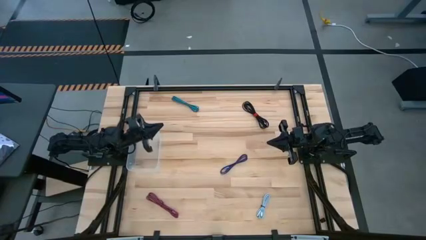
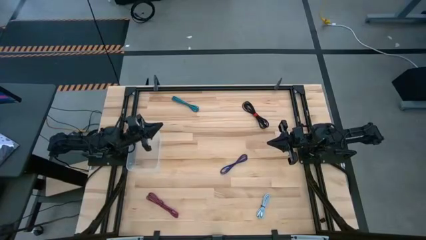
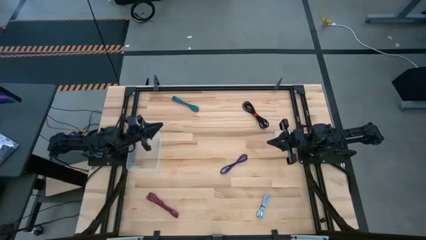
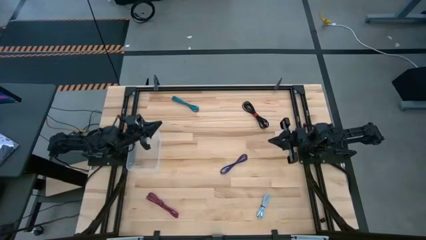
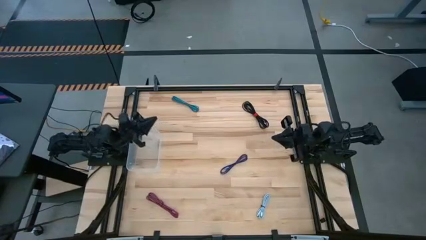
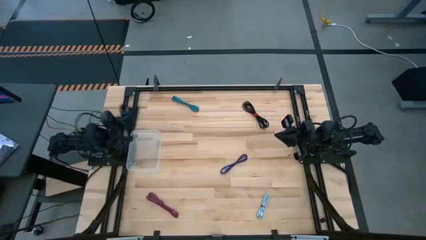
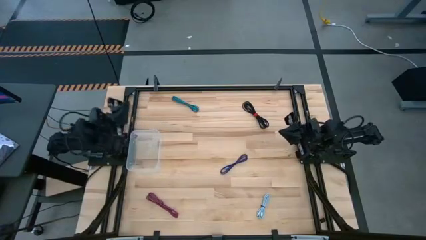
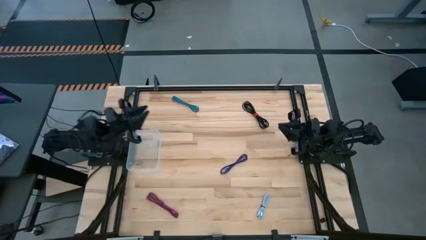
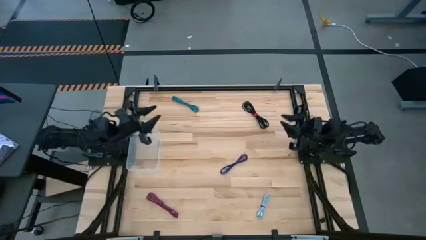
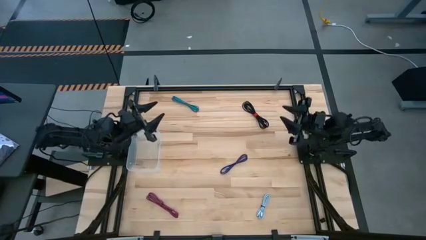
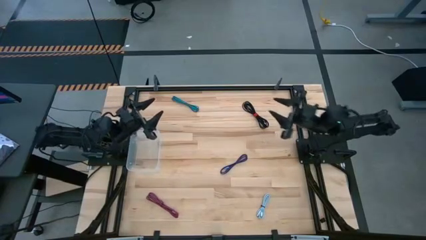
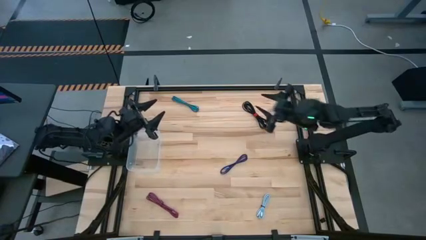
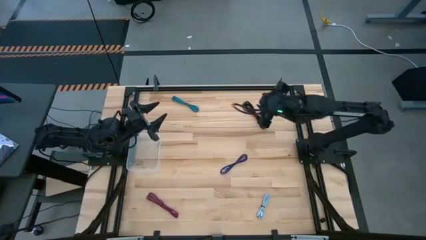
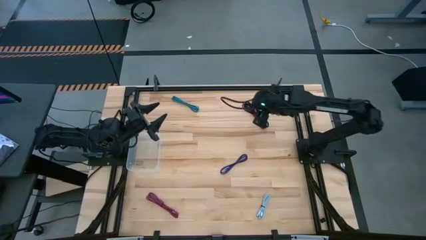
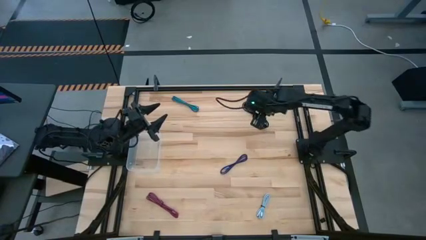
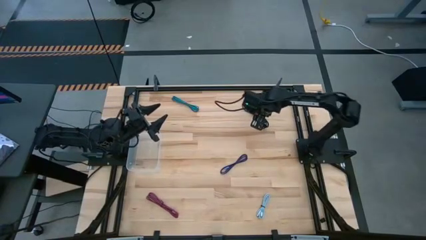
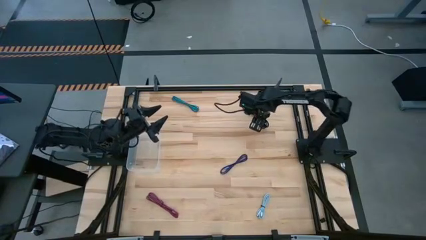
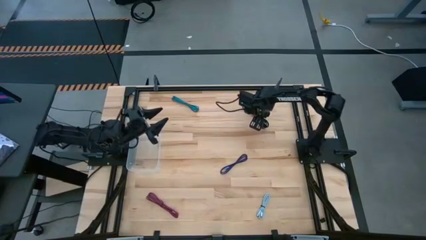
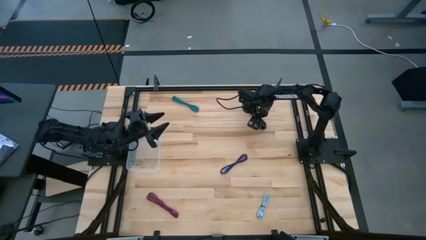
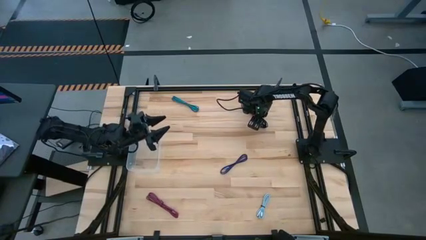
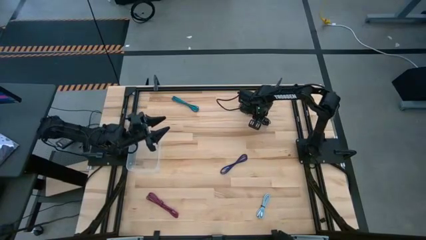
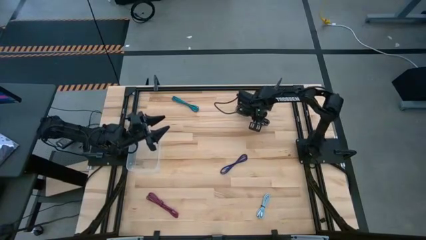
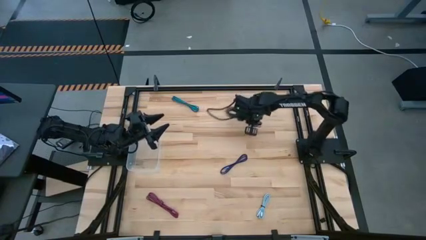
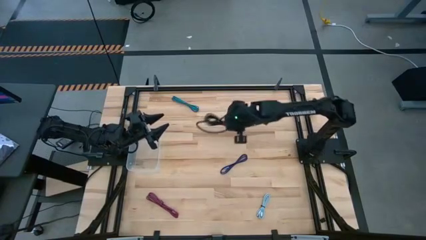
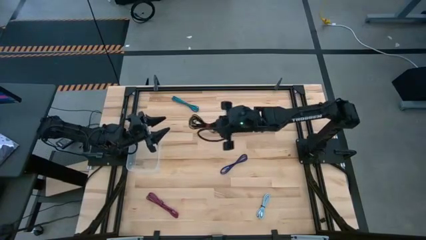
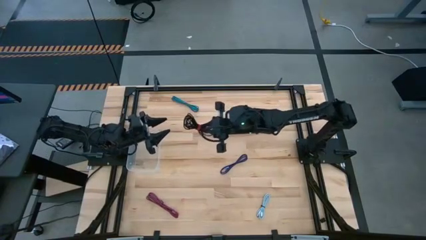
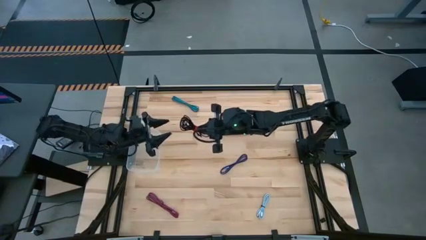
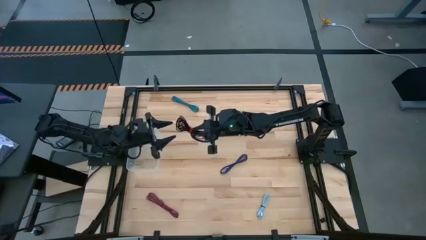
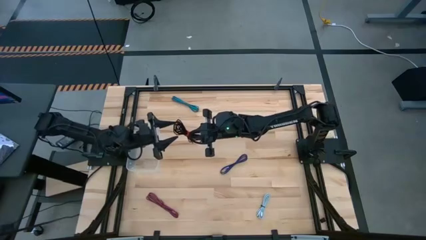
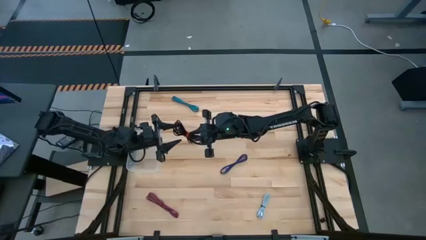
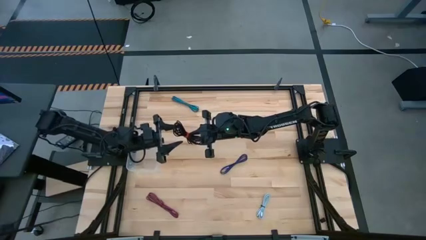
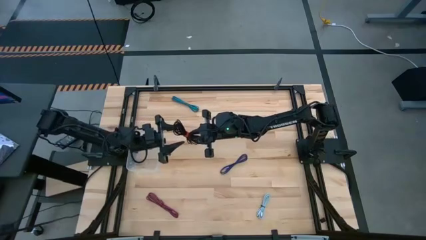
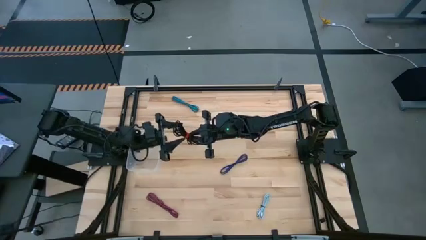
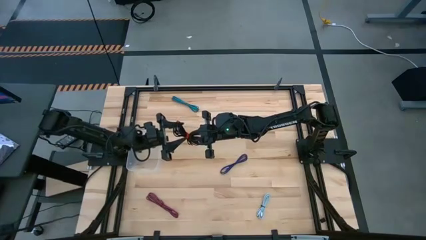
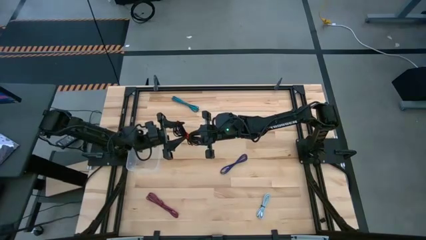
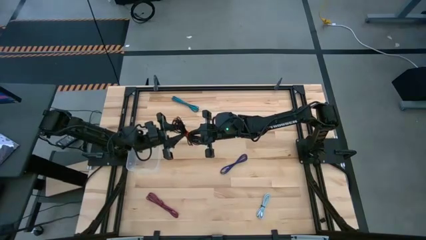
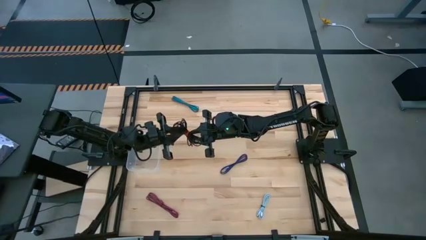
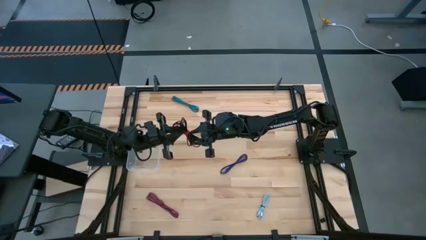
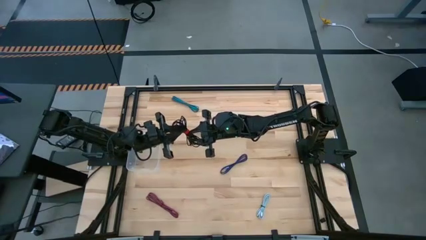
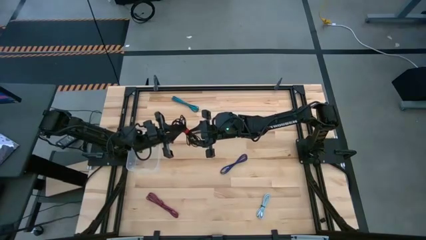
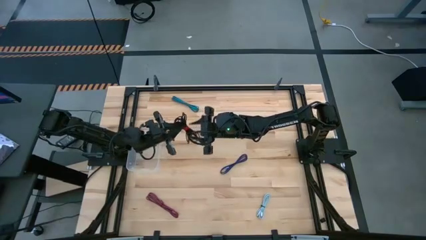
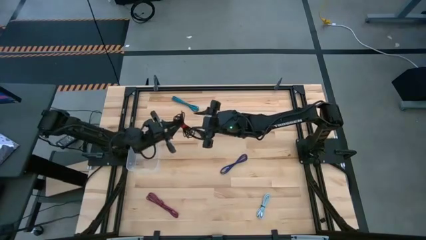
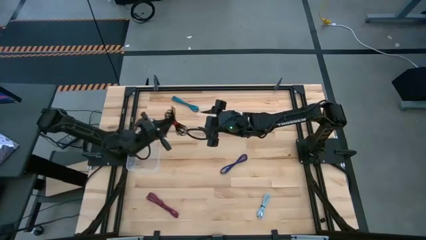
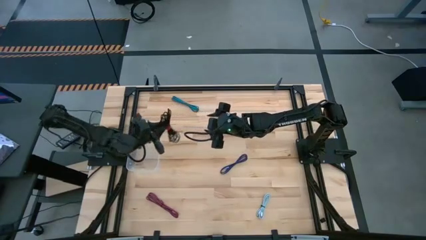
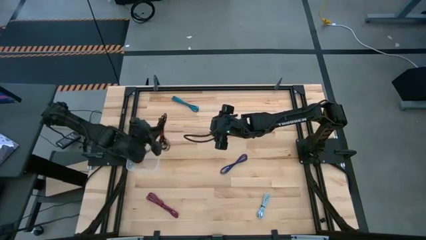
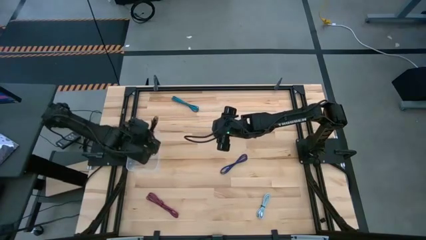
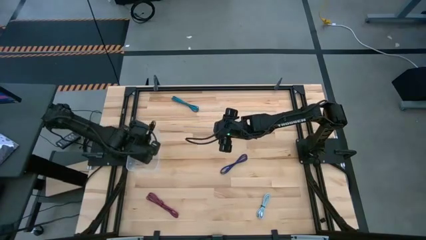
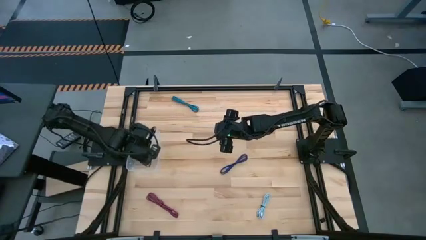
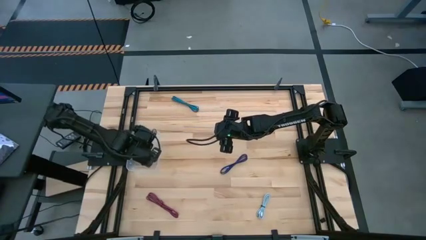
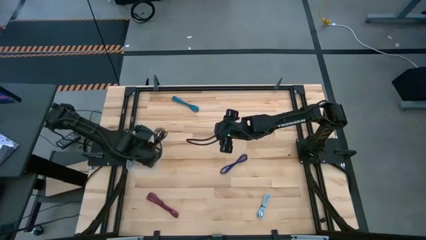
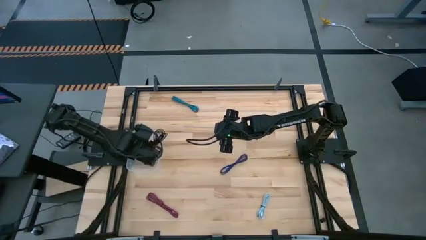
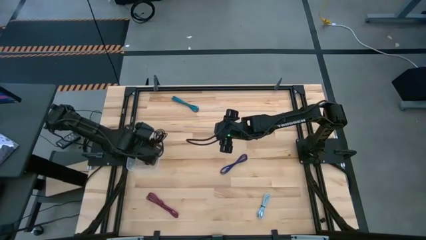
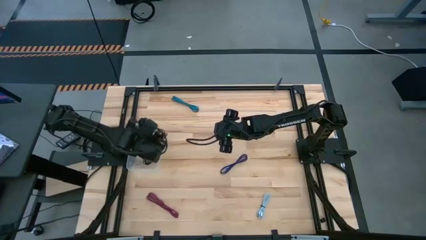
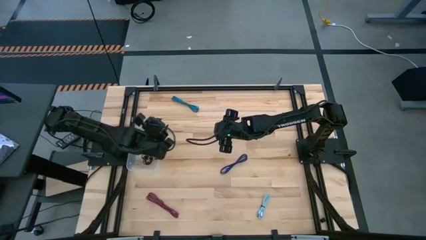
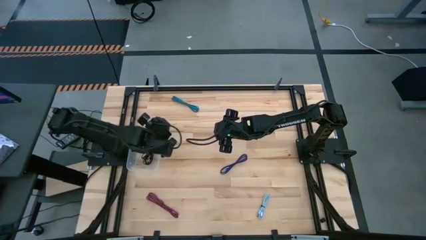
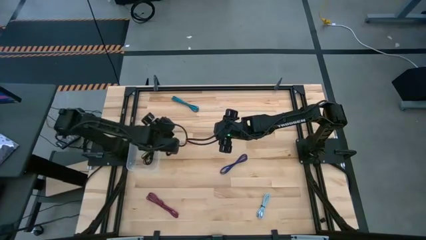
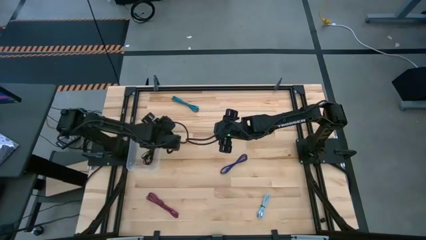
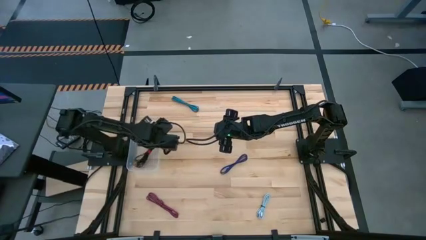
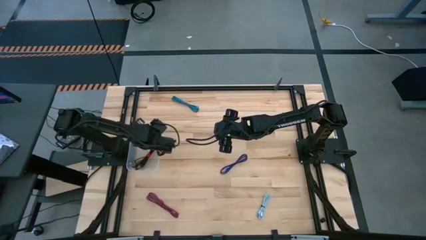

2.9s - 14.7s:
Task: Pick and place USB-C Cables
Put the black charger cable into the transparent bin

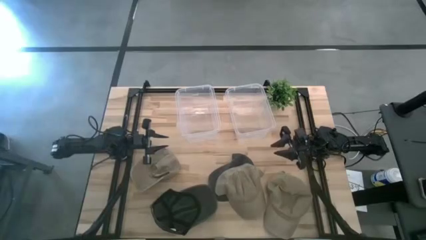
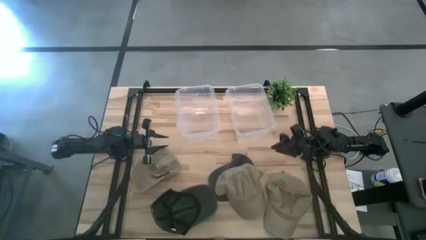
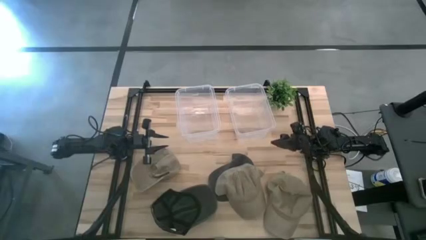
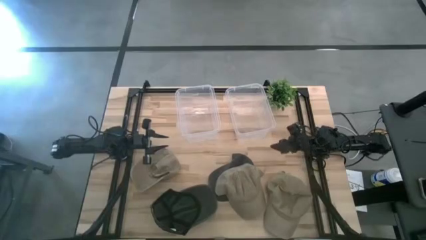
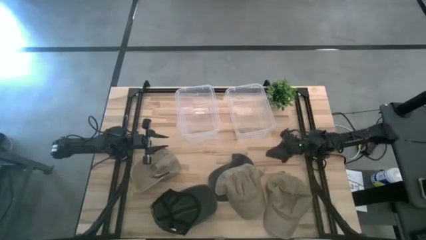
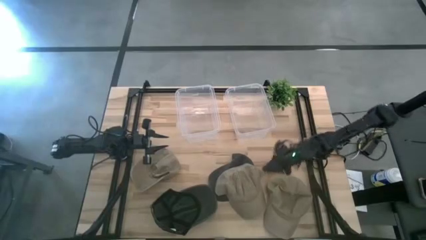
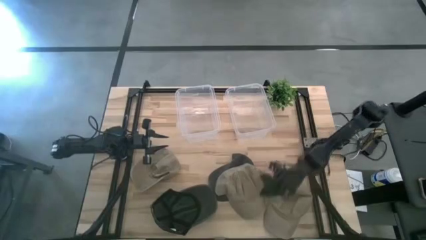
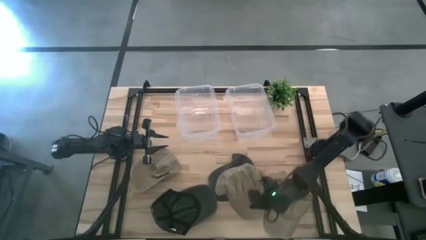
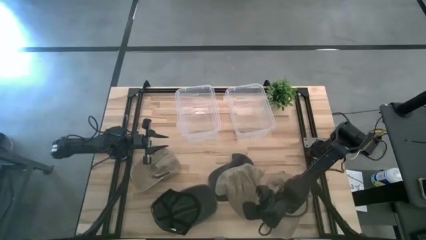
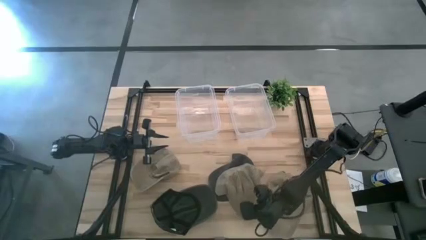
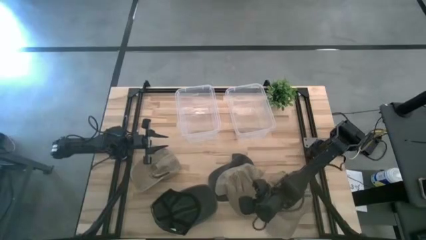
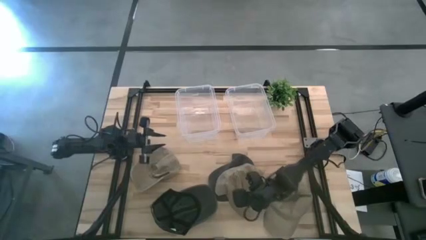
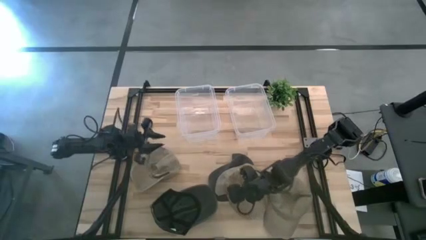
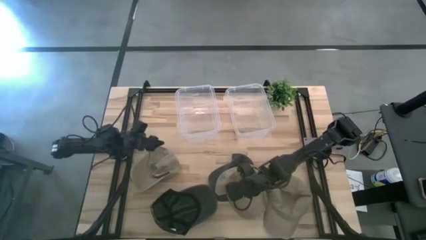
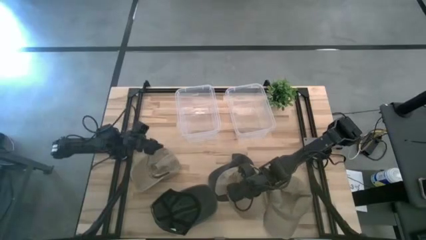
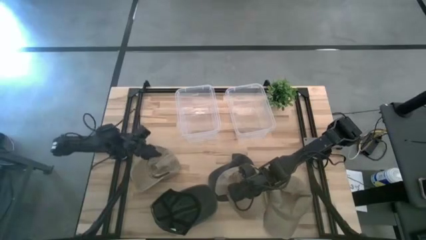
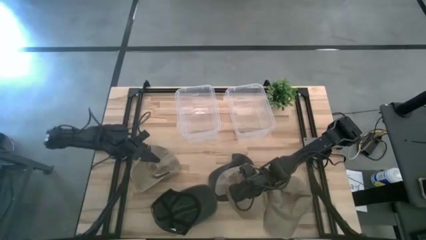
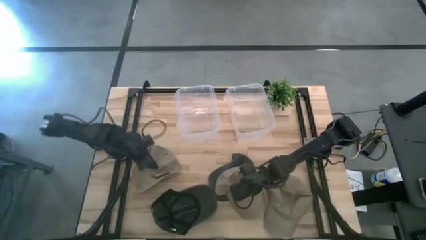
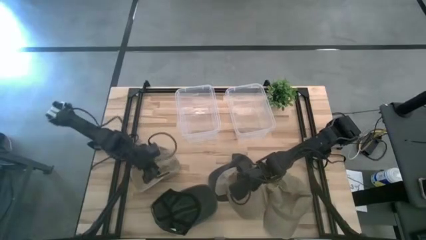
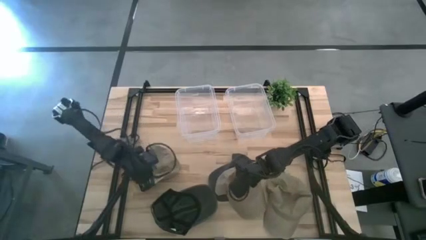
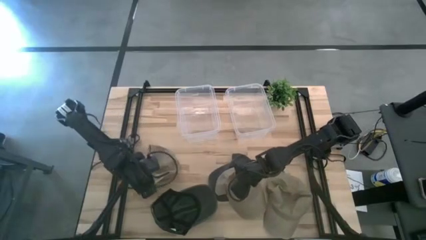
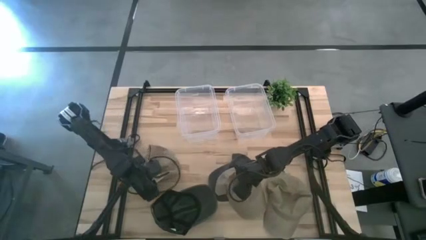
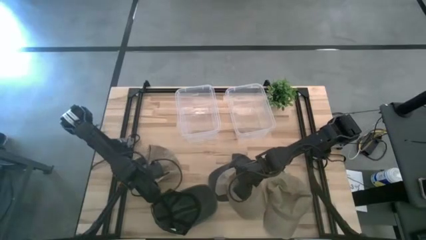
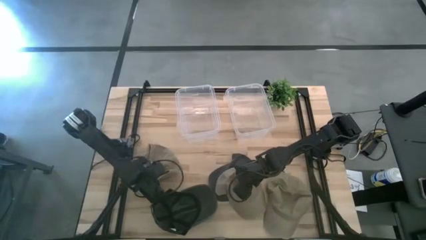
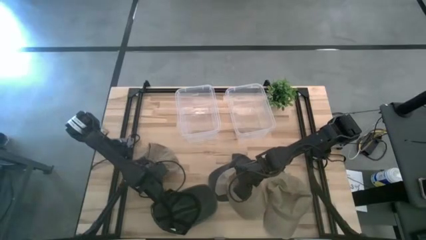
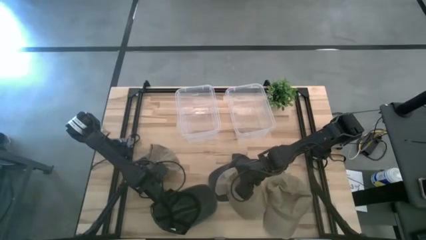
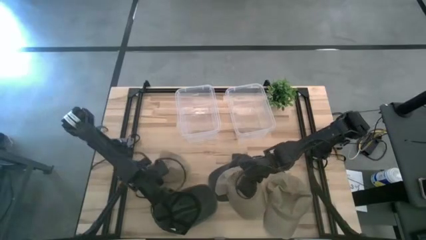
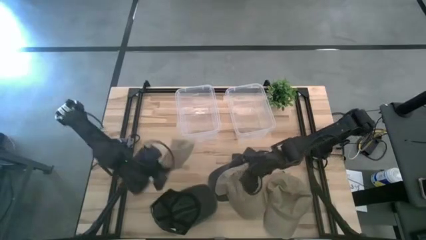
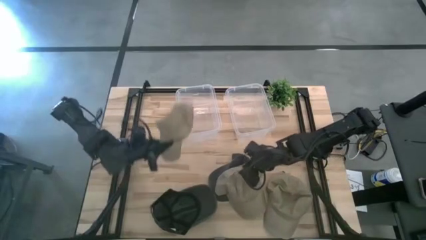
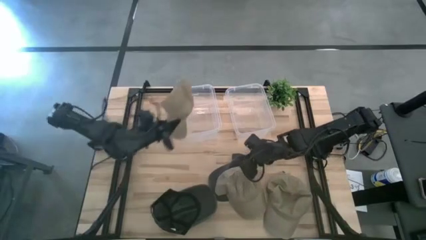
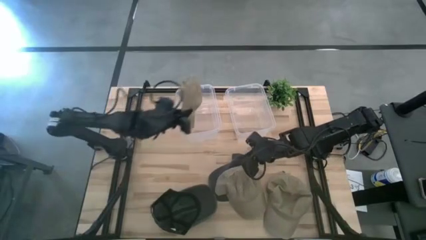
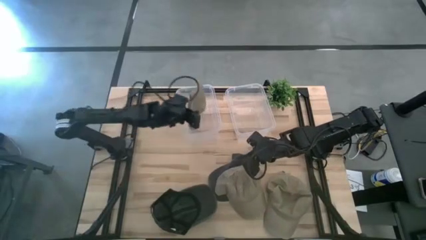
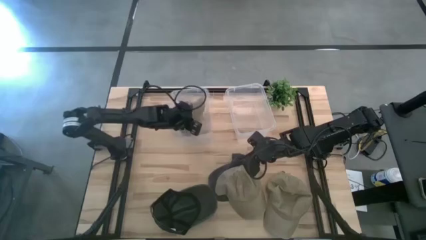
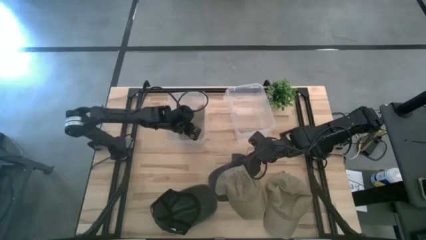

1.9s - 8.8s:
Task: Pick & Place hat
Put the left brown cap into the left transparent bin
